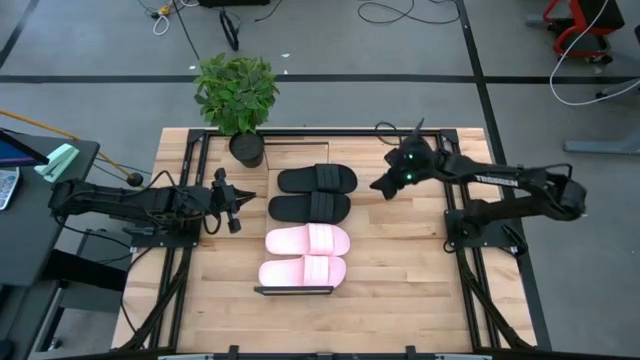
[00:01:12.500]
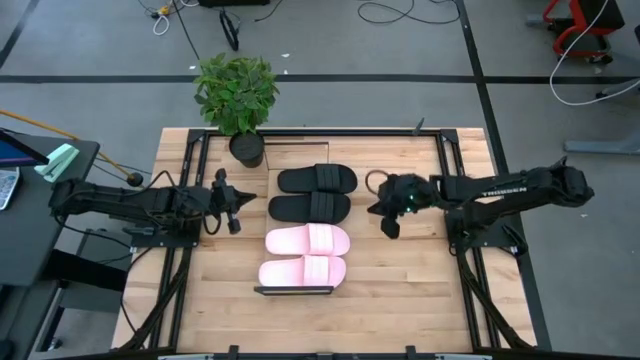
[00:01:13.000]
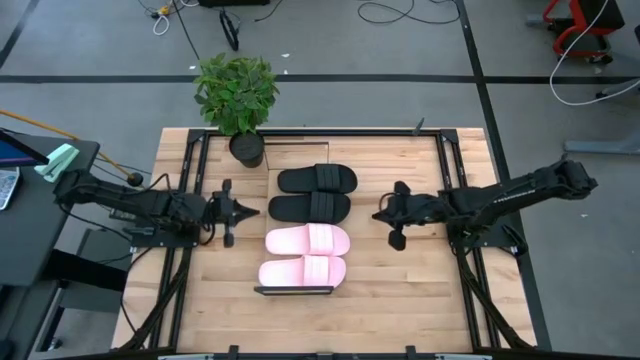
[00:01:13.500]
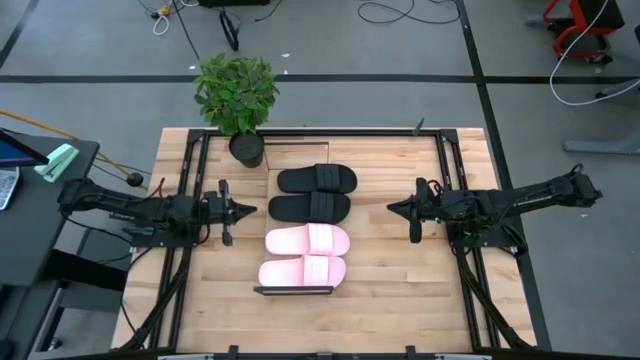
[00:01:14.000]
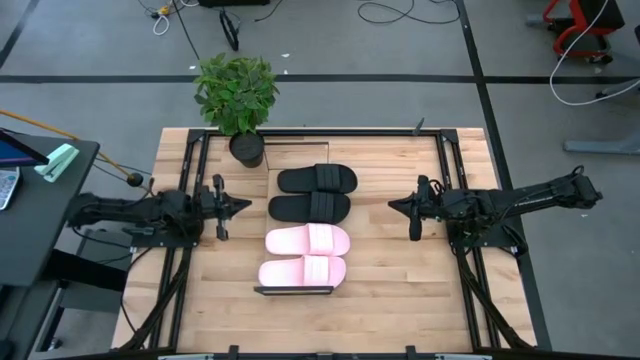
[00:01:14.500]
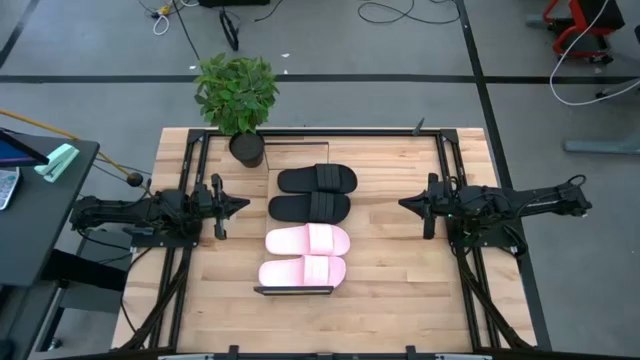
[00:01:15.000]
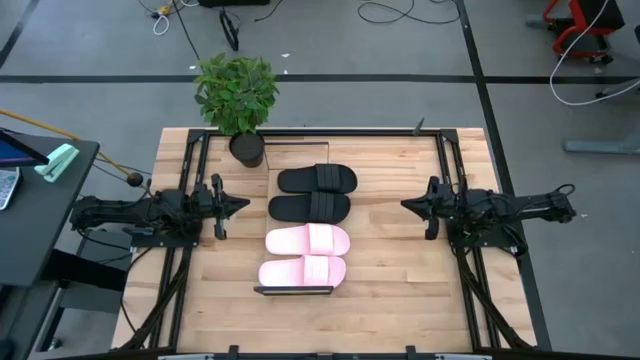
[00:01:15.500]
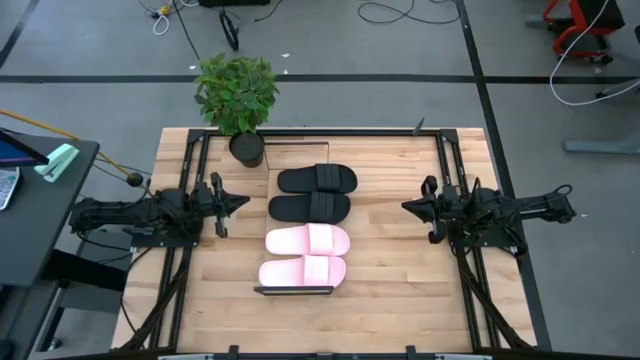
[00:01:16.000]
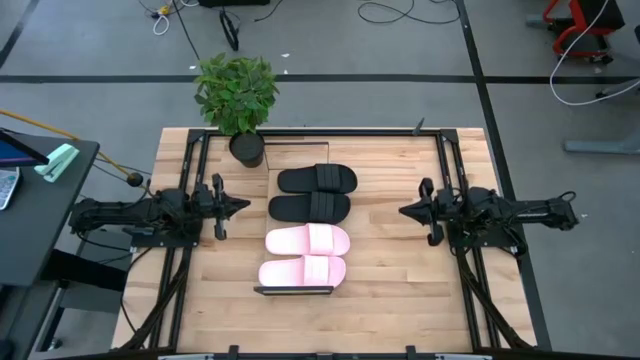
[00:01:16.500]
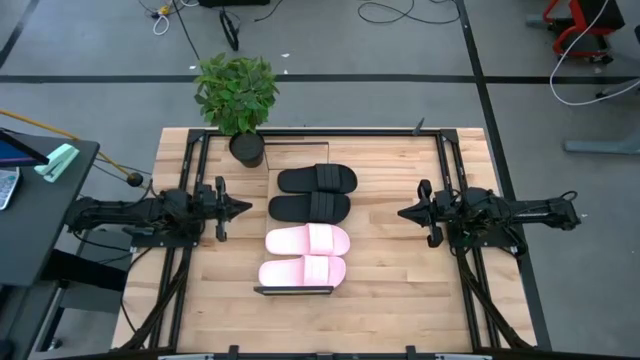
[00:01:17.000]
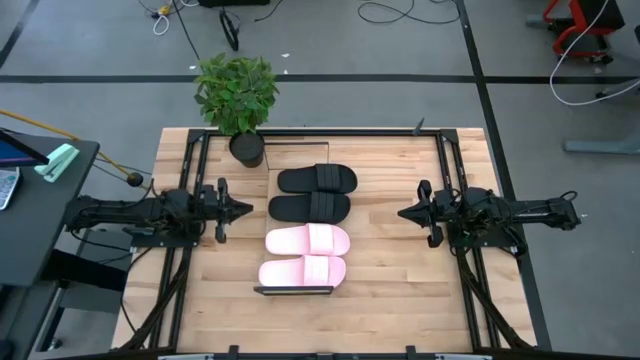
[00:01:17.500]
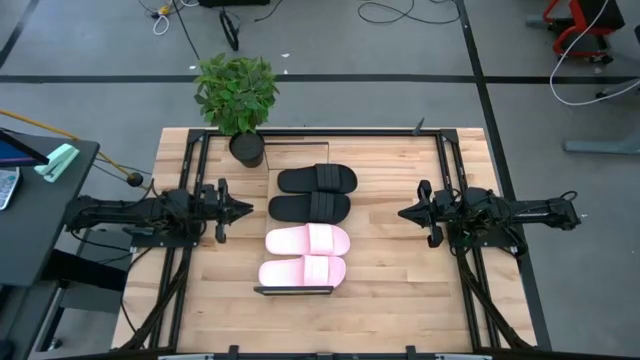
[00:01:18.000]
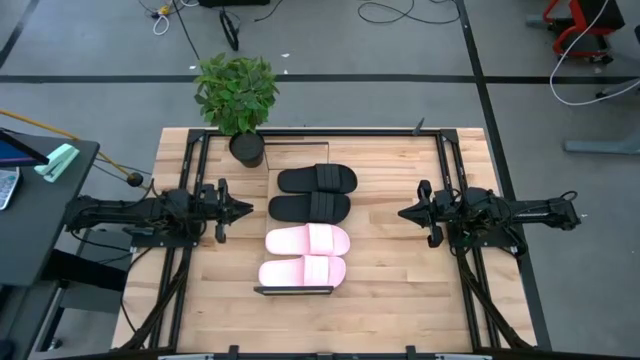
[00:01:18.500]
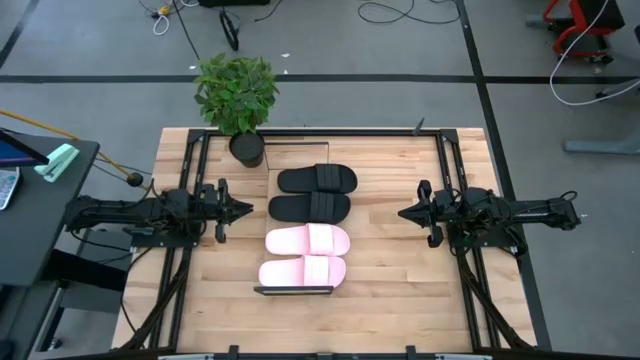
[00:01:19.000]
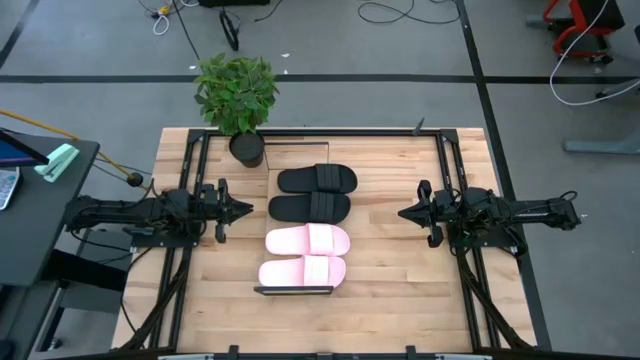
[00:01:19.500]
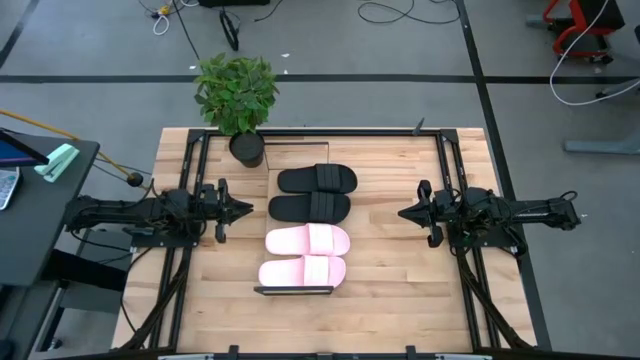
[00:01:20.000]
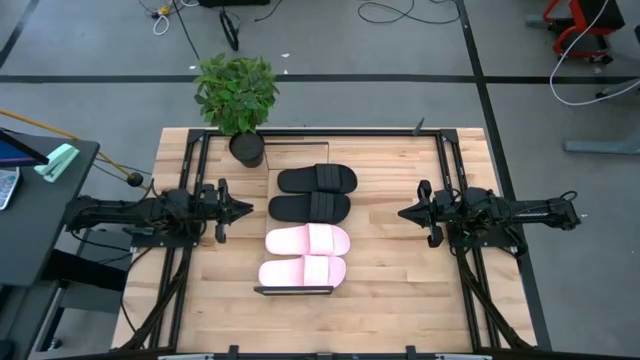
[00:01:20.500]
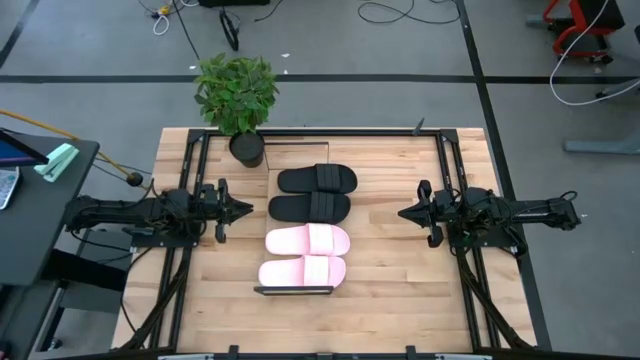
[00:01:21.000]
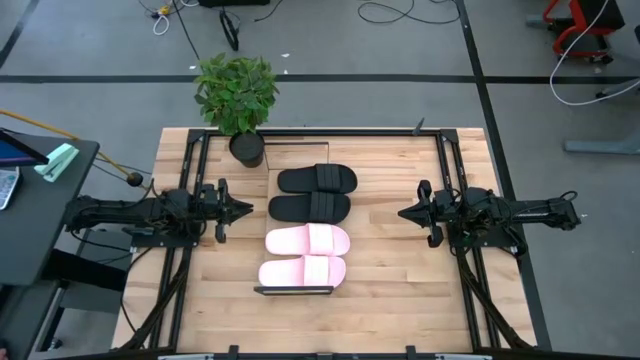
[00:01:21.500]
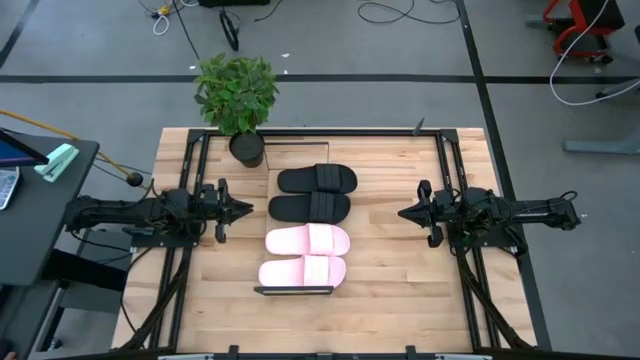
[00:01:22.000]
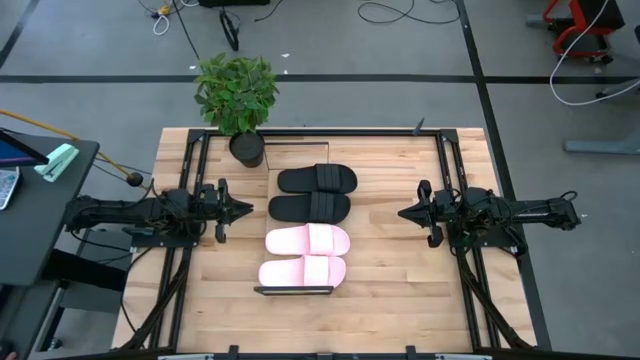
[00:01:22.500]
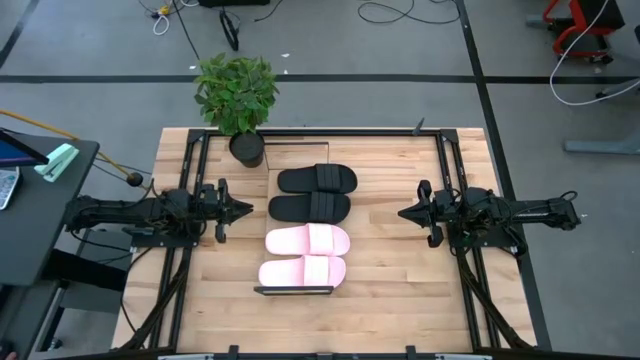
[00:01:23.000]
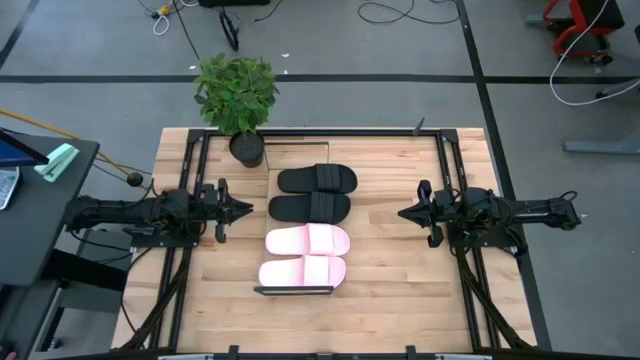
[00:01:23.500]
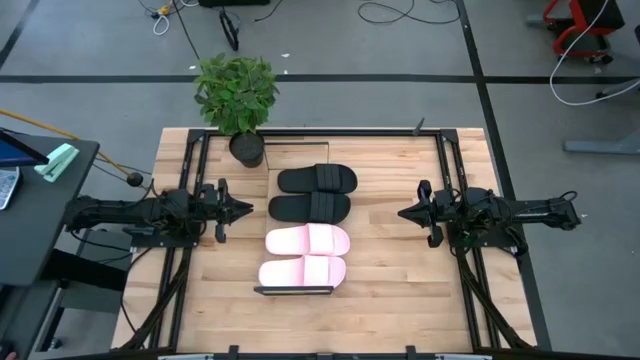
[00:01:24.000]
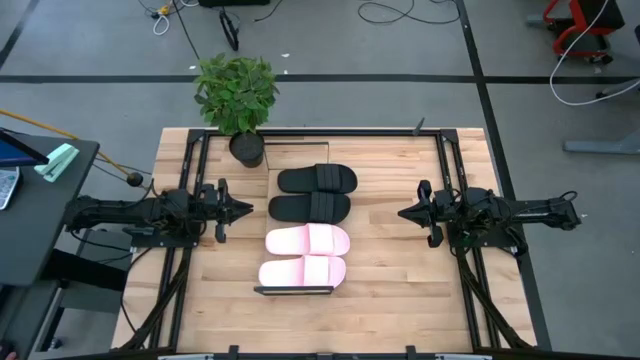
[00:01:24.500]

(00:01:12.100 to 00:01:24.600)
Task: Pick and place slides into the shelf
Return to Home Position

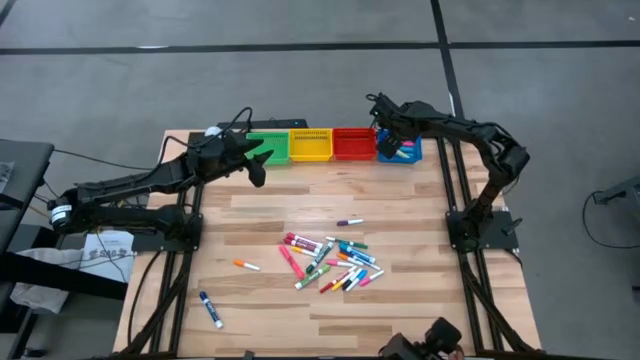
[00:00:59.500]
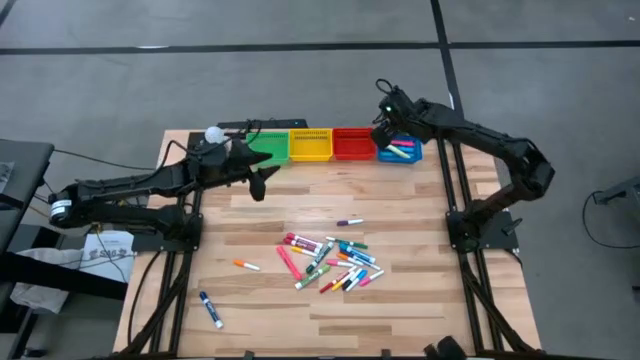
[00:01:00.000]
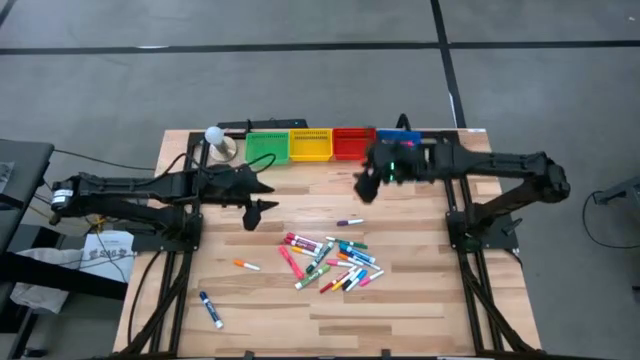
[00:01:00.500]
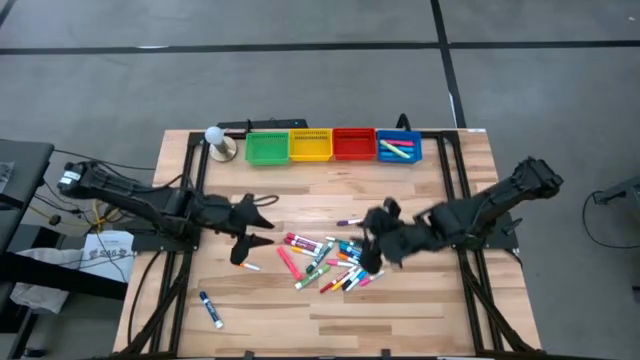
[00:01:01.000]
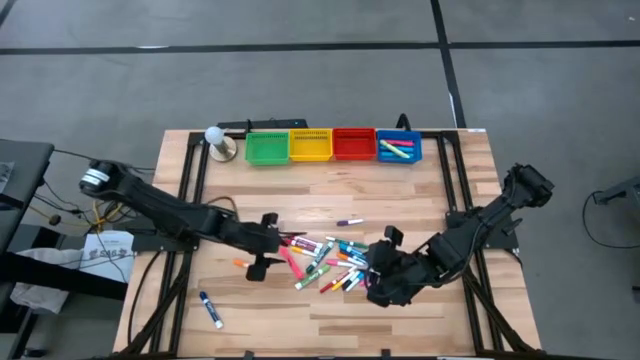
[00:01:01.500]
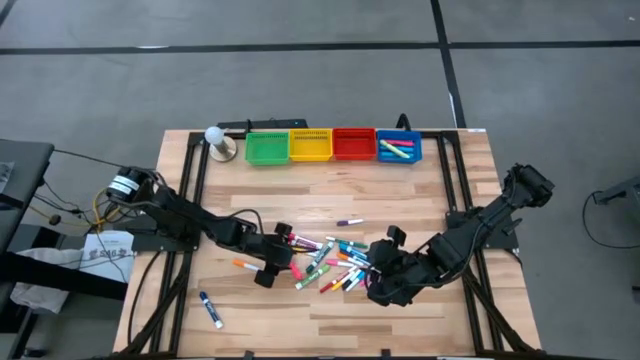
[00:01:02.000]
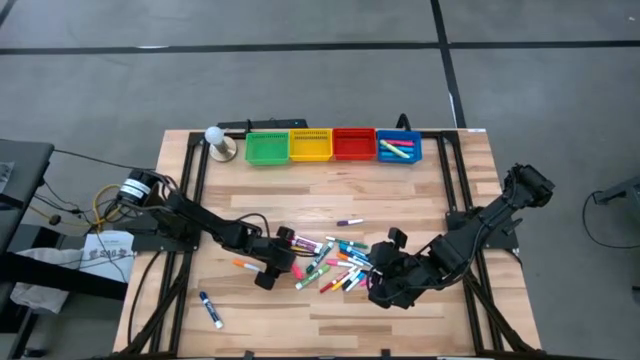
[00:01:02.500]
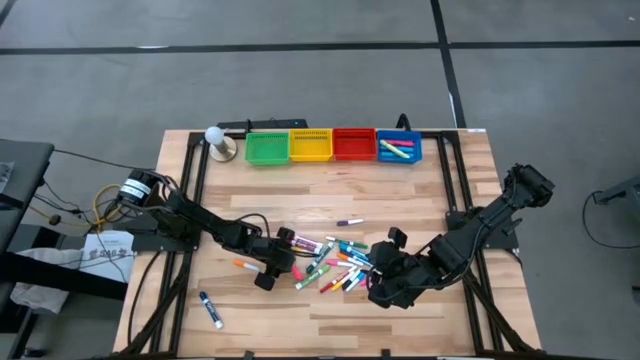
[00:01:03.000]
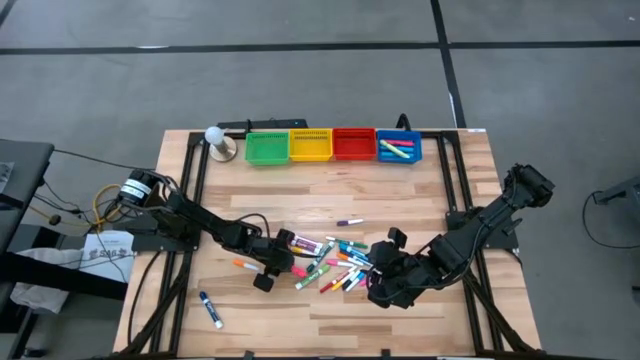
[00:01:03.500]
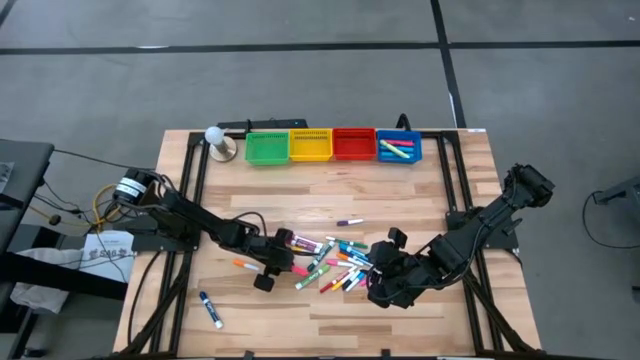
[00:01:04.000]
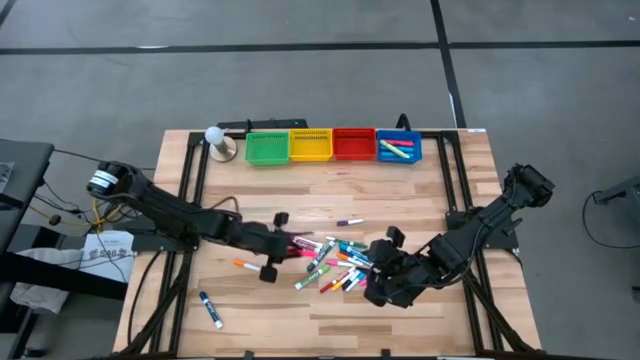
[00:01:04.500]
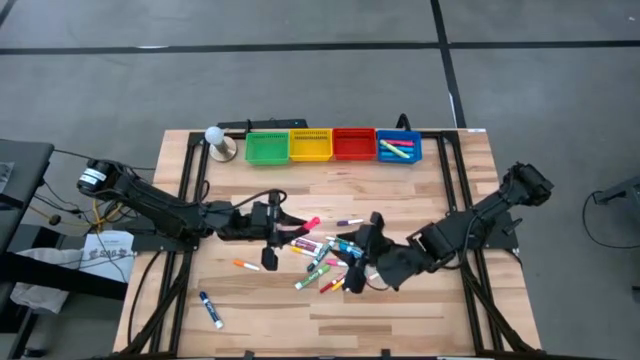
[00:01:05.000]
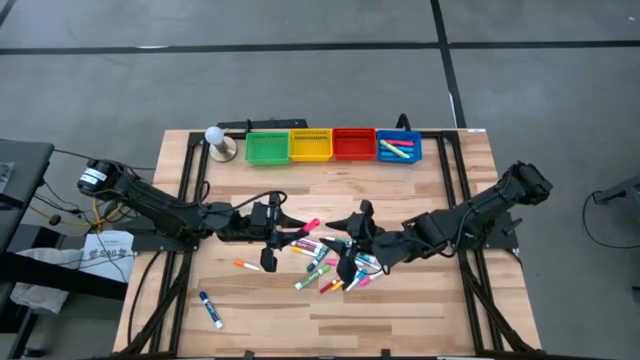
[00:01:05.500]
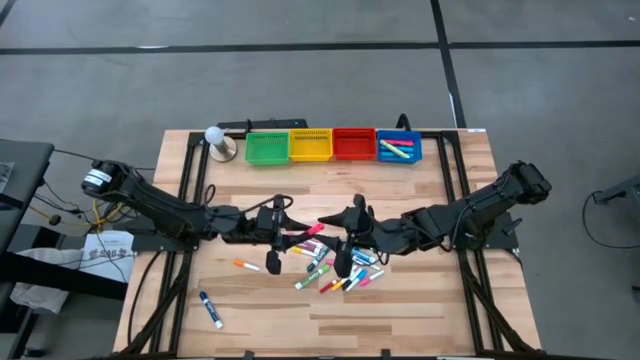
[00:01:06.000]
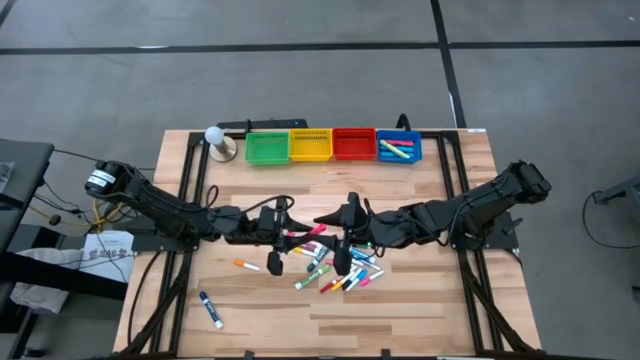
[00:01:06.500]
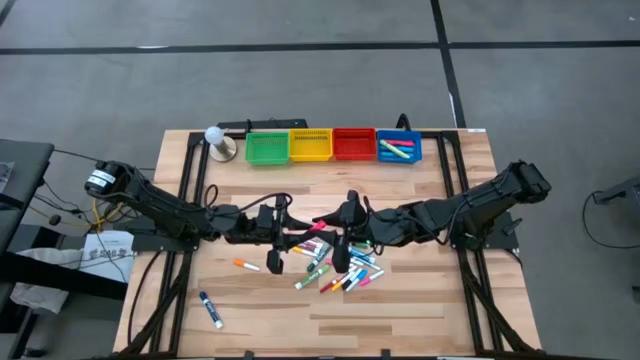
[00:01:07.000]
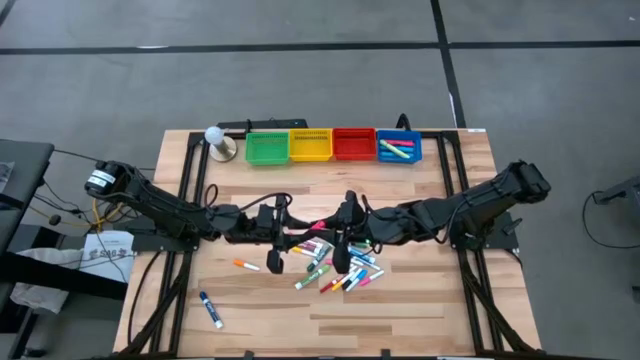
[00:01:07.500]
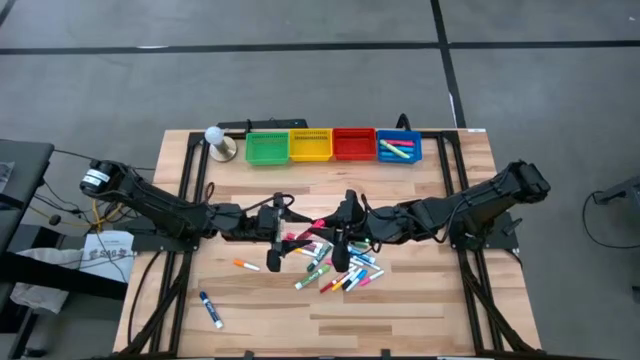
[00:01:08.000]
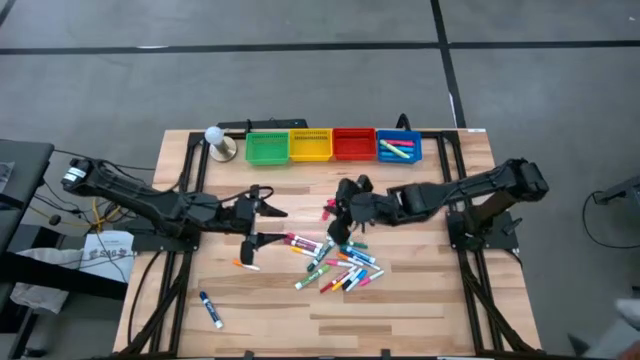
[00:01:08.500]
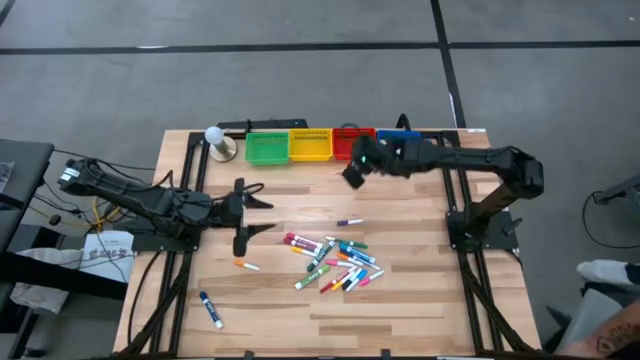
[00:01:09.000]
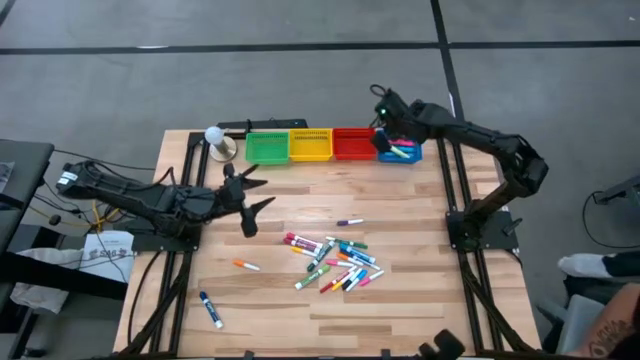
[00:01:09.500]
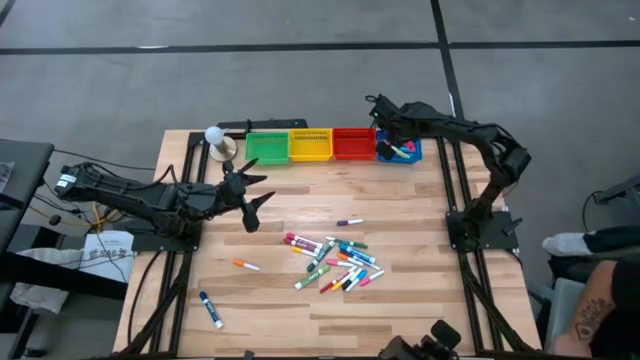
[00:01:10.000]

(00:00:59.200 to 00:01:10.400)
Task: Pick & Place Markers
Put the pink highlighter pen into the blue basket
